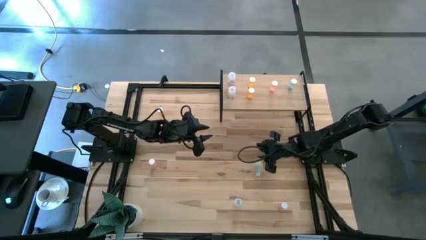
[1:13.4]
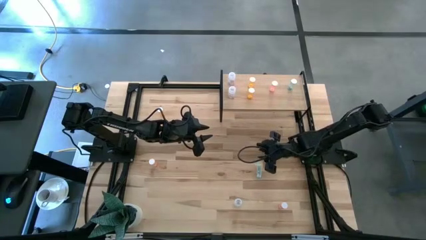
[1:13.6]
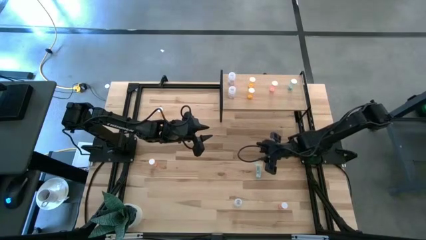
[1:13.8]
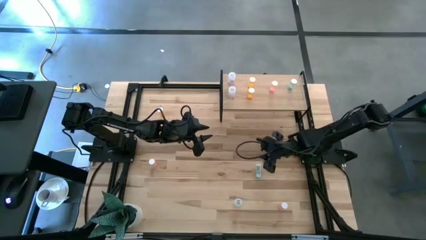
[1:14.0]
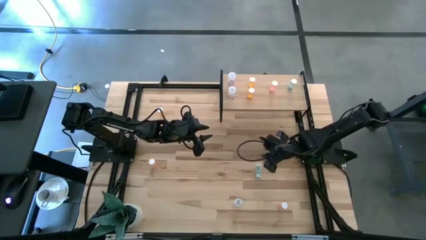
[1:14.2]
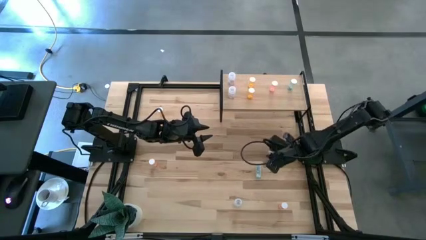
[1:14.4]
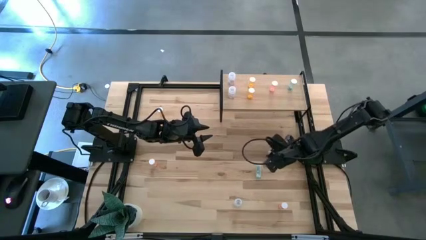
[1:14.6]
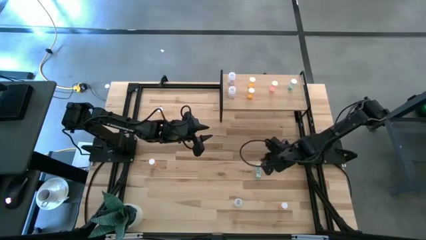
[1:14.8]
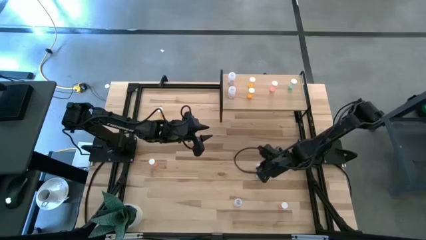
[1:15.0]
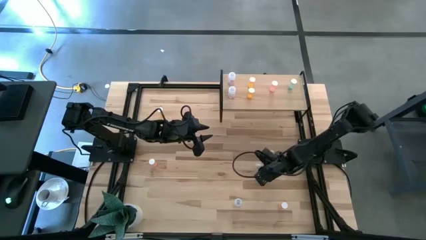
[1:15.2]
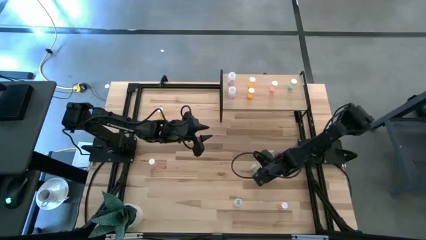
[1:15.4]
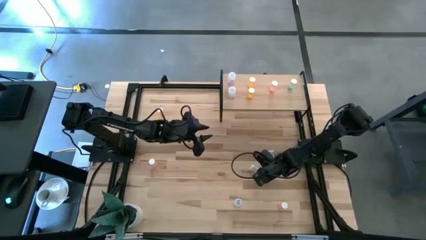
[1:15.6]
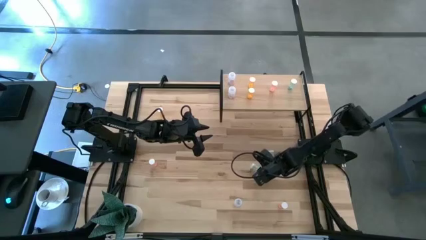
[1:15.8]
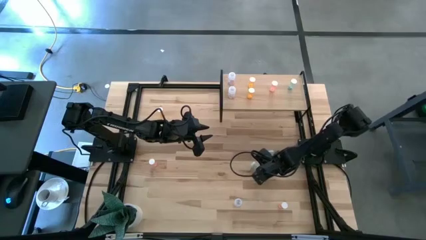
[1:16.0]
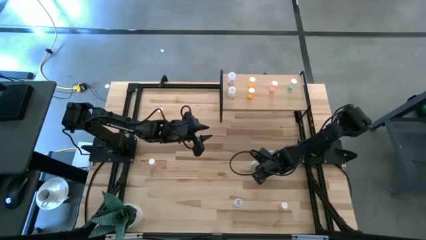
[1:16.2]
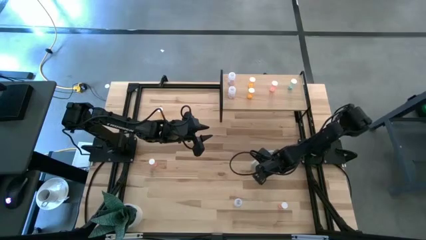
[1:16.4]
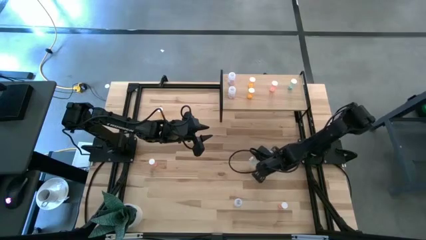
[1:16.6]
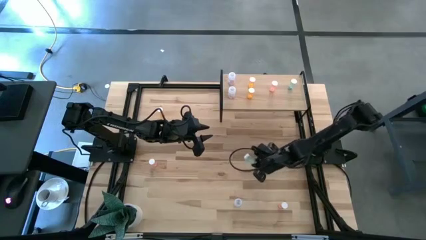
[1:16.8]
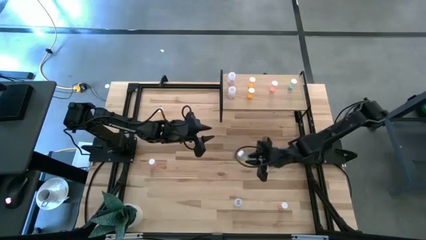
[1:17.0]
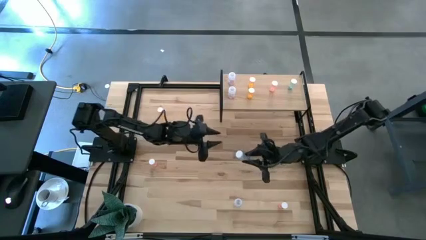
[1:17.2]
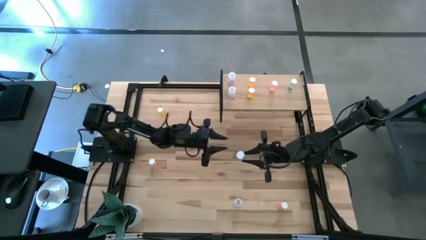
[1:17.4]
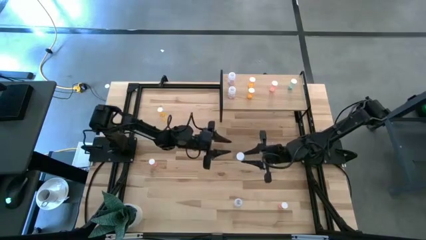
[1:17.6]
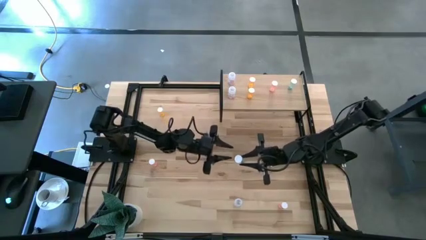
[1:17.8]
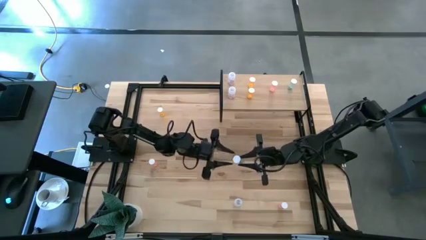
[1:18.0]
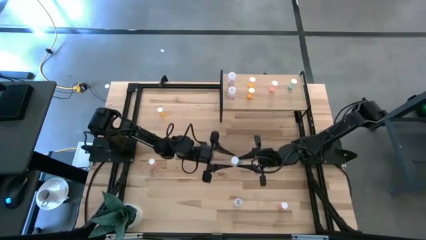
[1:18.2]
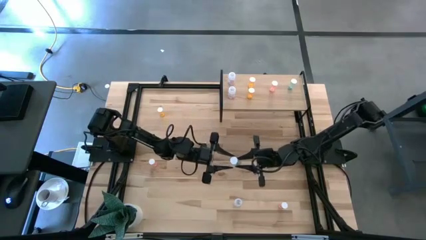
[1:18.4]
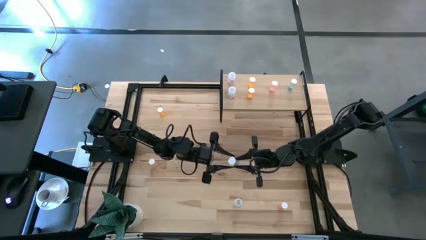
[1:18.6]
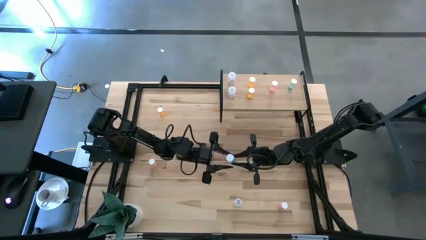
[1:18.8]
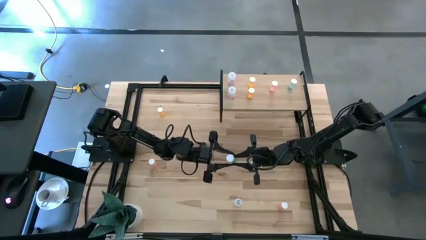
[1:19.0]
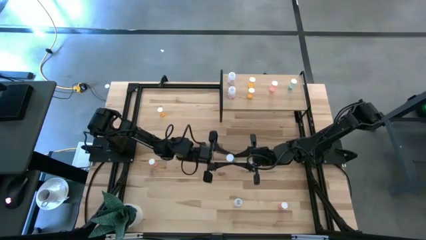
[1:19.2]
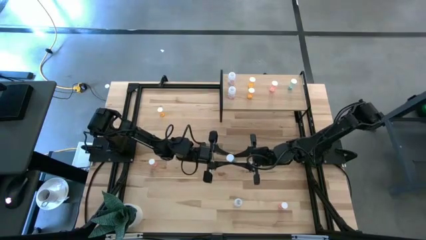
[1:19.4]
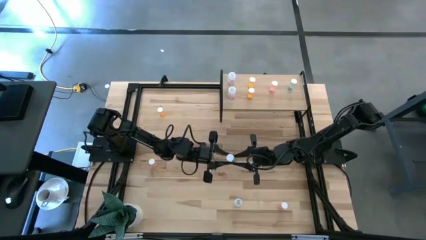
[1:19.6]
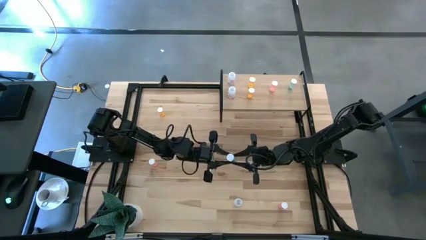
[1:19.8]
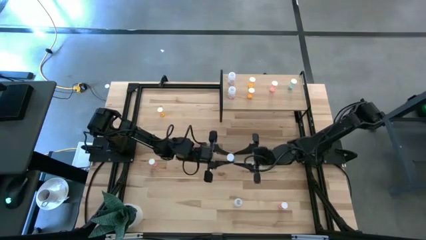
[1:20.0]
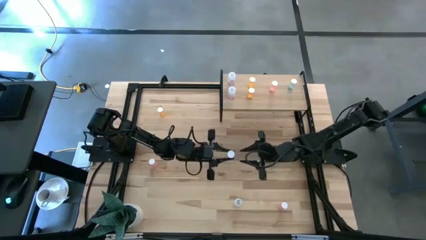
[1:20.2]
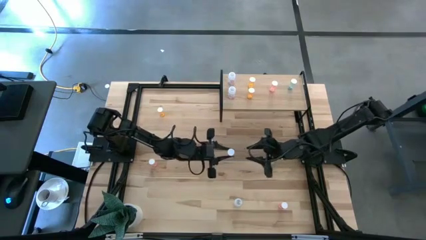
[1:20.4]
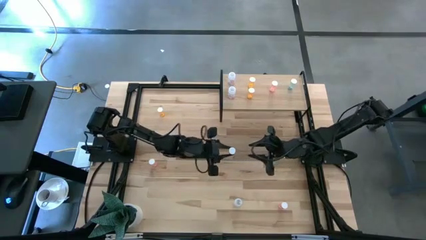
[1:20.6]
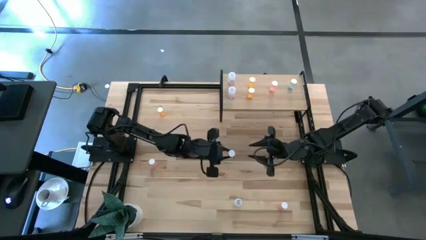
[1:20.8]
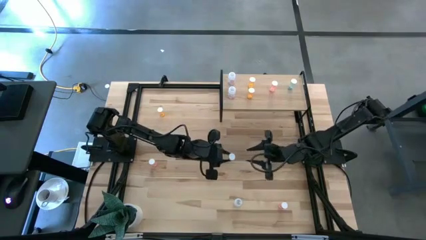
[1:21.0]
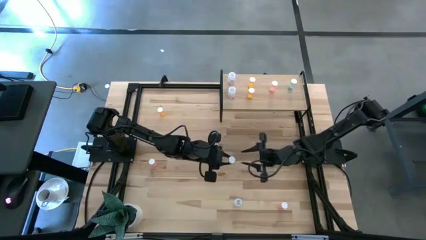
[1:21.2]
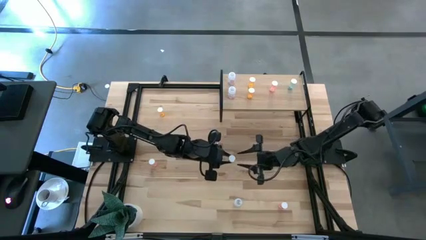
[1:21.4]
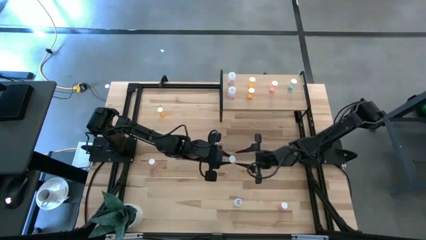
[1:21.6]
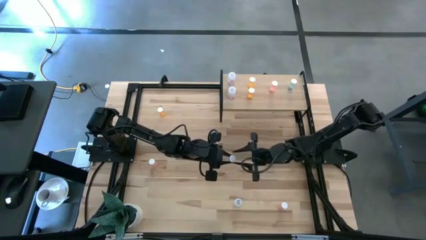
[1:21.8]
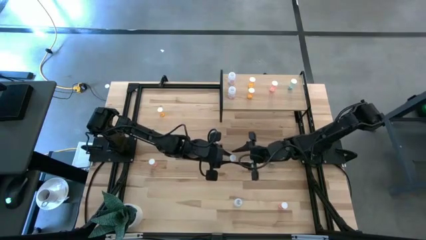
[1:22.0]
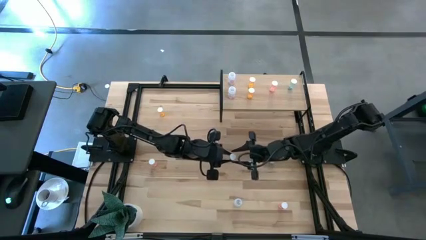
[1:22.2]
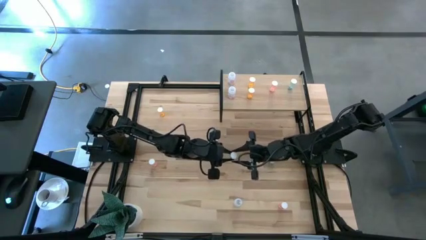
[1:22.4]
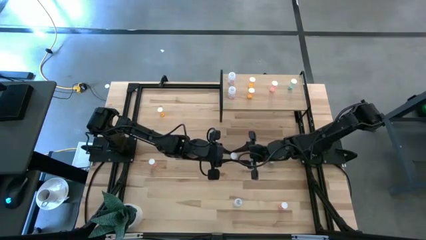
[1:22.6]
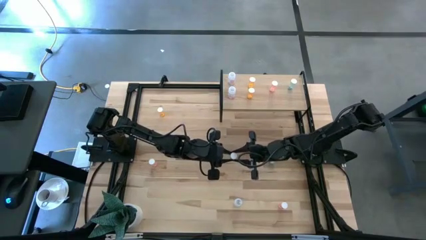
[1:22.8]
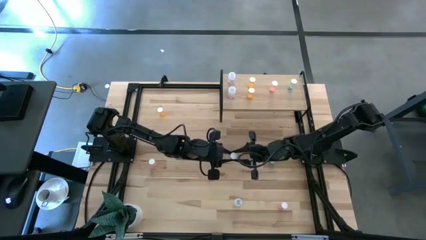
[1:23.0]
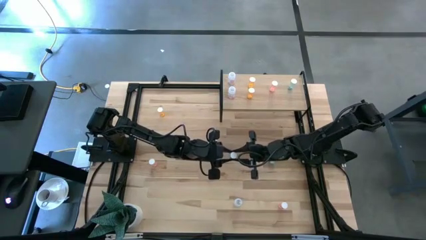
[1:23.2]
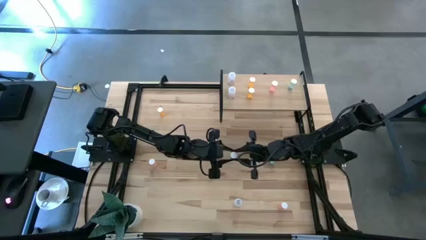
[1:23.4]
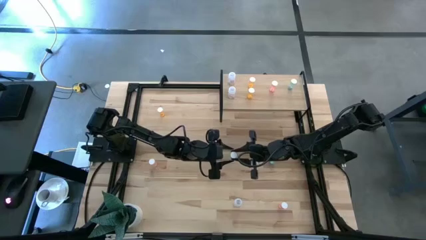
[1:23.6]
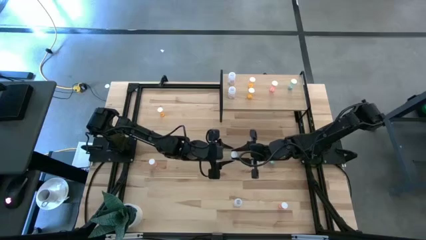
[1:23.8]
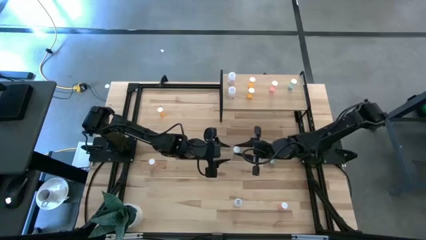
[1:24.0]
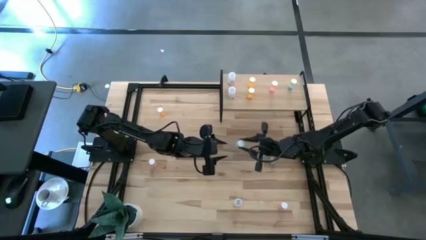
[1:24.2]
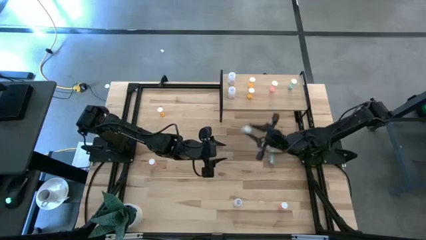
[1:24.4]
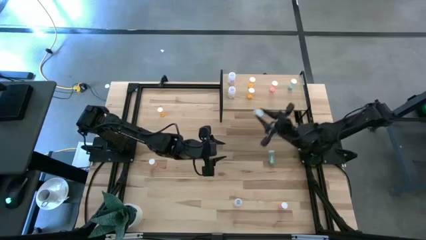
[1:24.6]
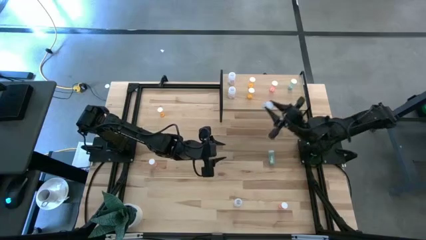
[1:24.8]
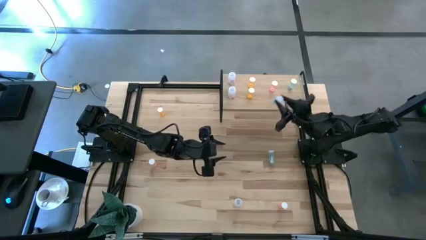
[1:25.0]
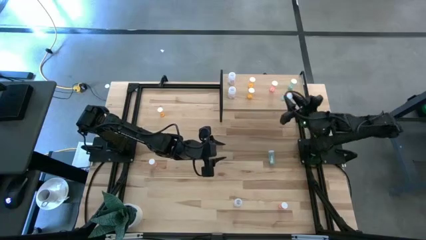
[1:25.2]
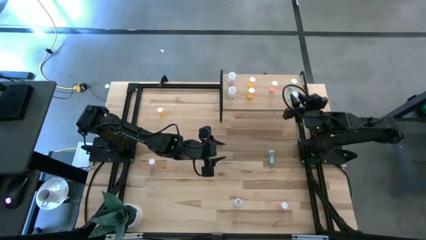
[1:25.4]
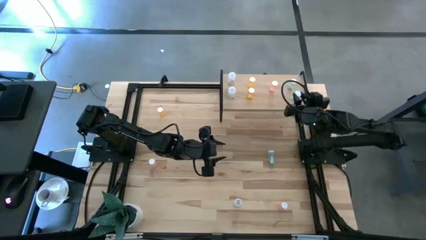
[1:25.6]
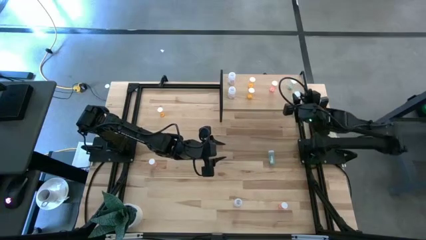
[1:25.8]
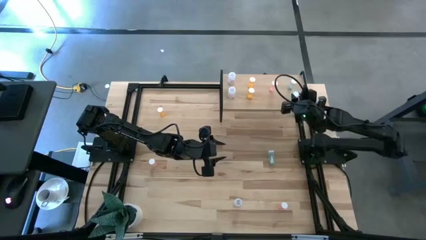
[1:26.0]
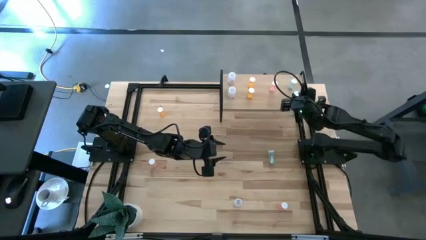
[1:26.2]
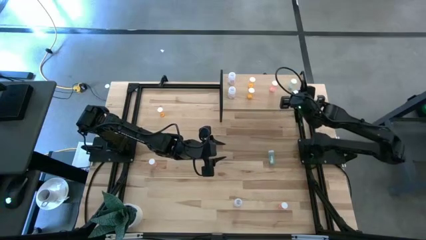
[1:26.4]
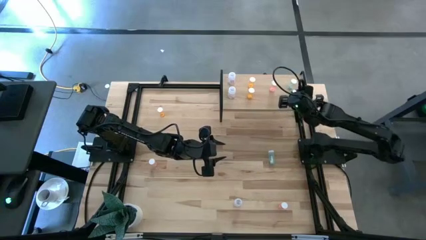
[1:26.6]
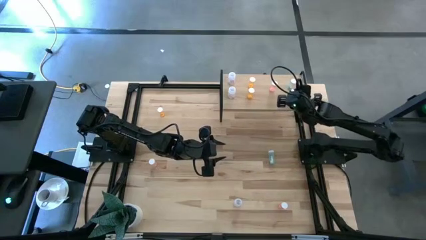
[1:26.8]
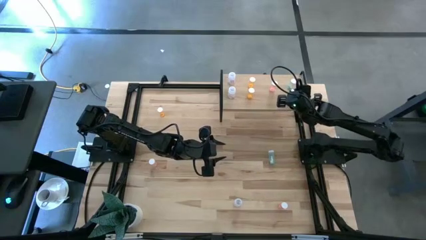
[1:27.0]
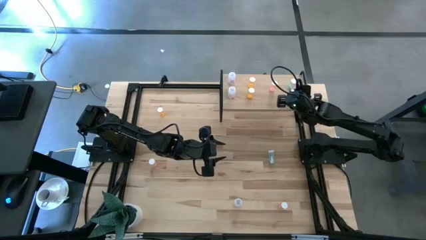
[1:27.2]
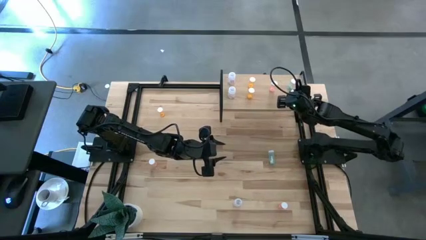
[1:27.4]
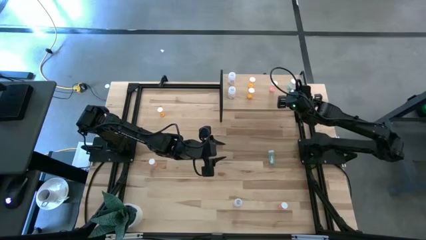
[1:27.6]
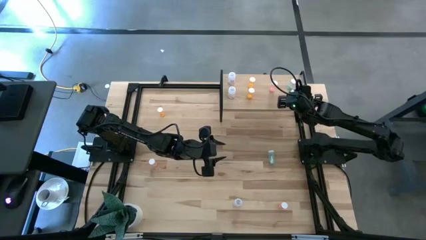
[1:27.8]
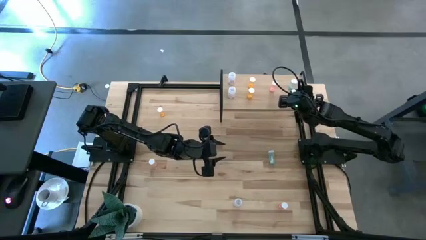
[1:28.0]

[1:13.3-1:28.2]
Task: Pick and place medicine bottles onto shelf by color
Put the left blue pill bottle on the shelf aligned with the other blue pill bottle
